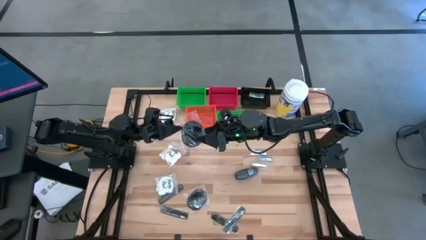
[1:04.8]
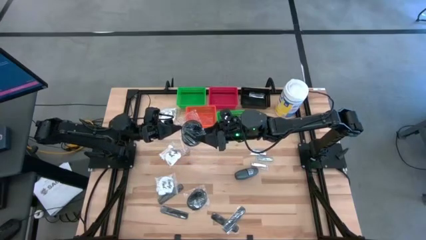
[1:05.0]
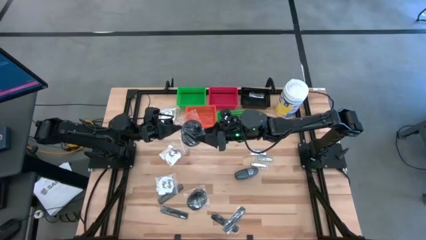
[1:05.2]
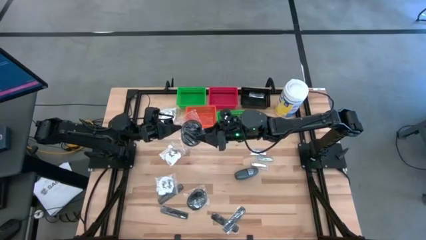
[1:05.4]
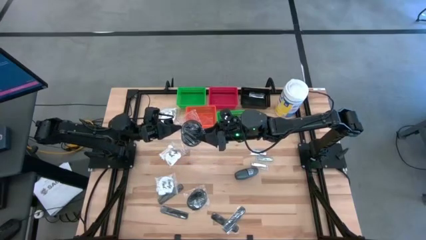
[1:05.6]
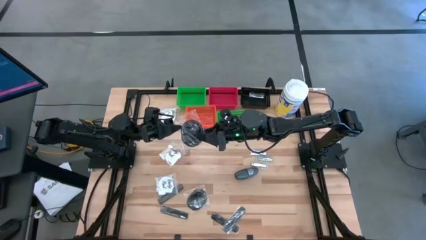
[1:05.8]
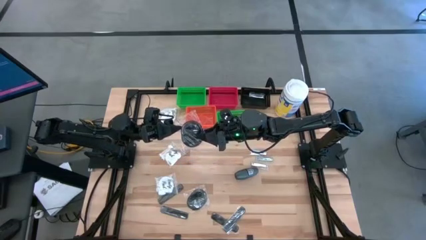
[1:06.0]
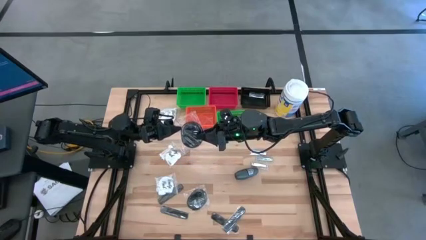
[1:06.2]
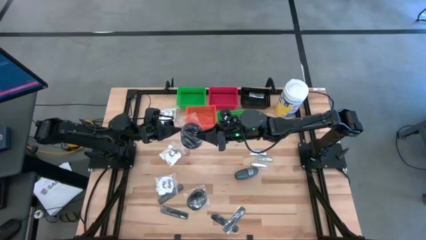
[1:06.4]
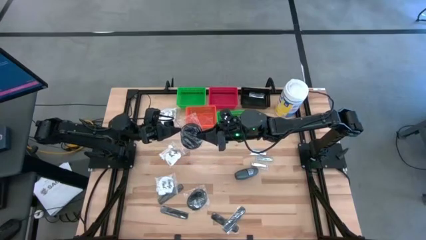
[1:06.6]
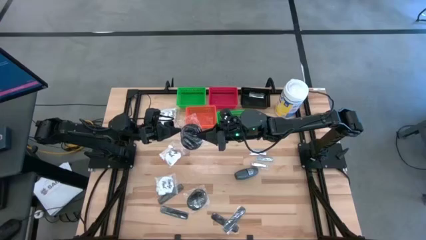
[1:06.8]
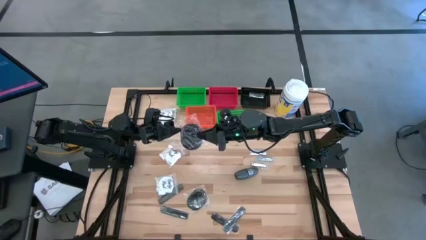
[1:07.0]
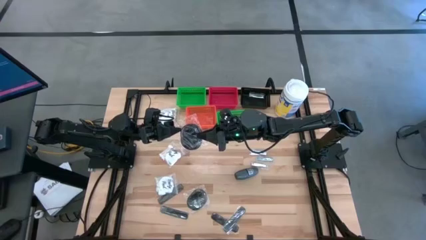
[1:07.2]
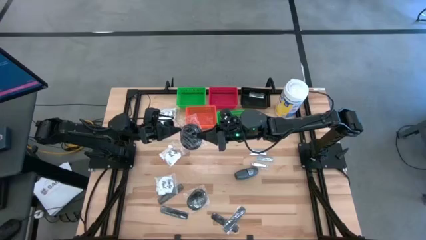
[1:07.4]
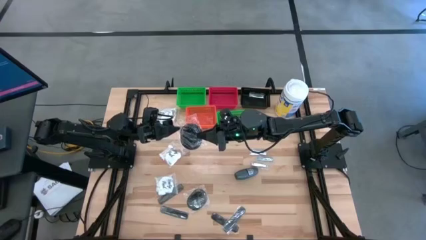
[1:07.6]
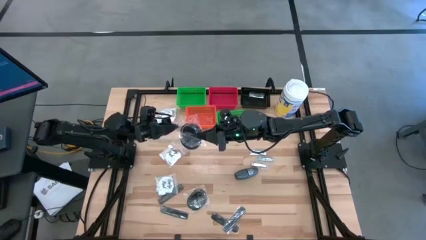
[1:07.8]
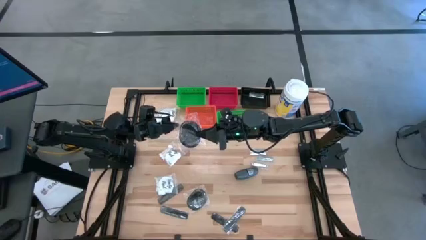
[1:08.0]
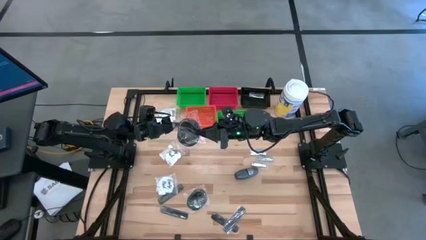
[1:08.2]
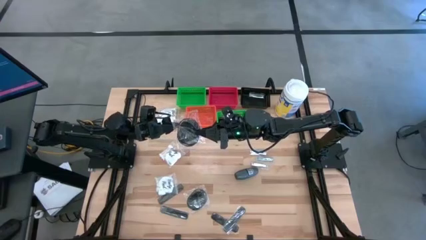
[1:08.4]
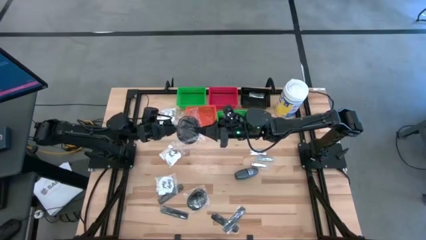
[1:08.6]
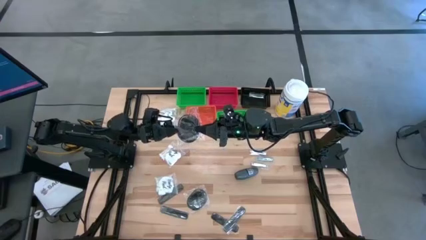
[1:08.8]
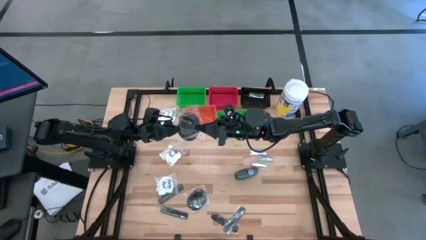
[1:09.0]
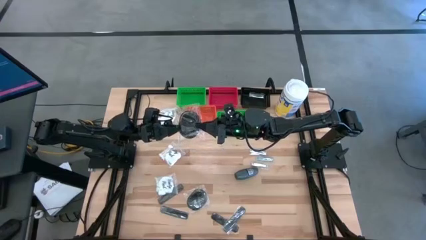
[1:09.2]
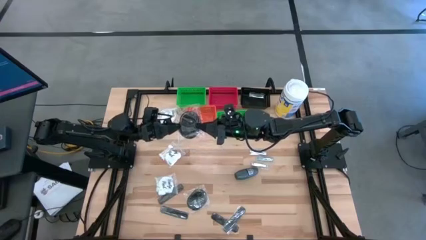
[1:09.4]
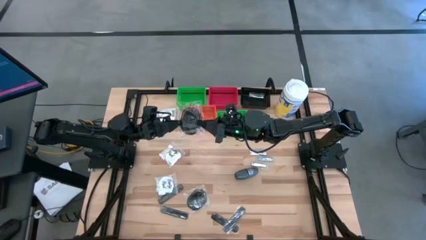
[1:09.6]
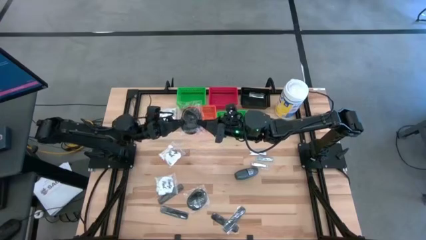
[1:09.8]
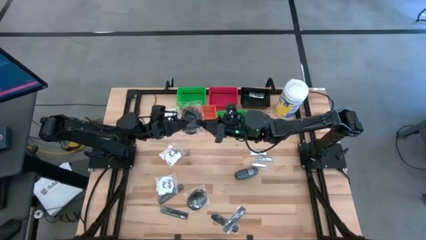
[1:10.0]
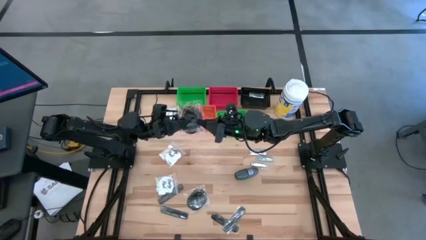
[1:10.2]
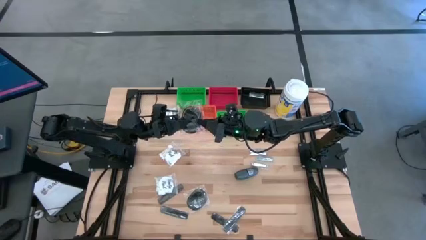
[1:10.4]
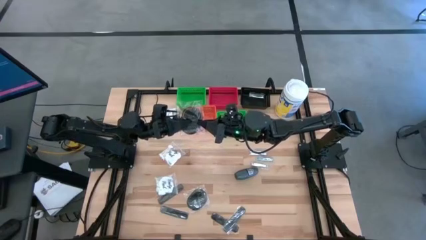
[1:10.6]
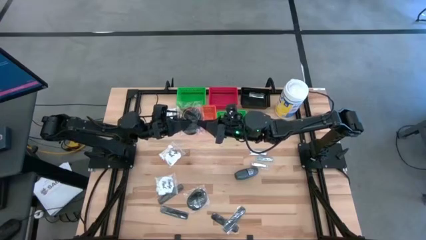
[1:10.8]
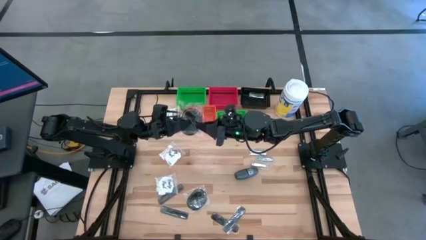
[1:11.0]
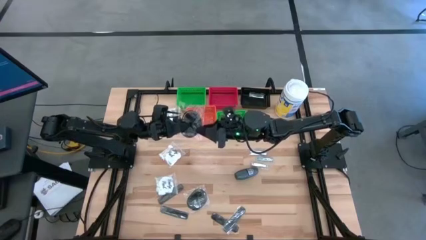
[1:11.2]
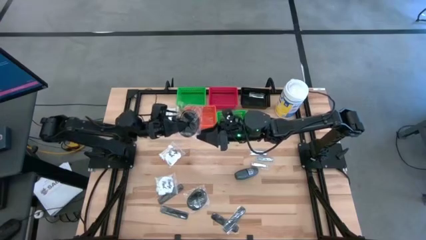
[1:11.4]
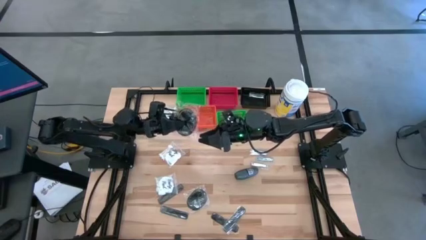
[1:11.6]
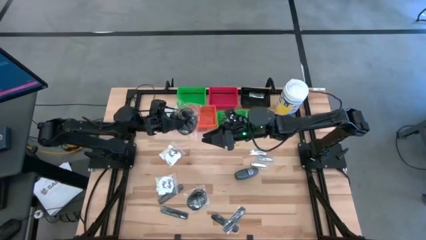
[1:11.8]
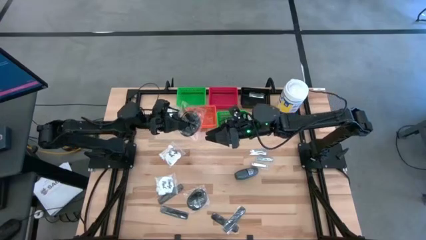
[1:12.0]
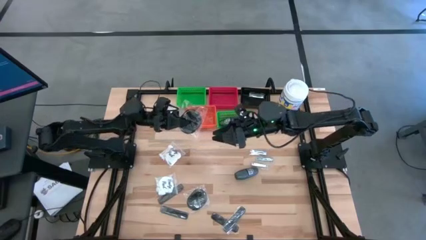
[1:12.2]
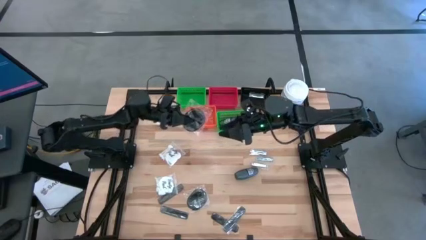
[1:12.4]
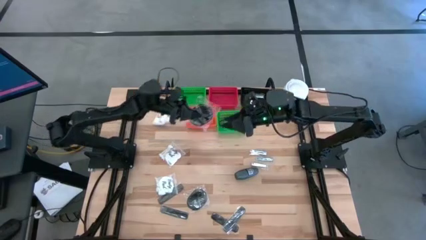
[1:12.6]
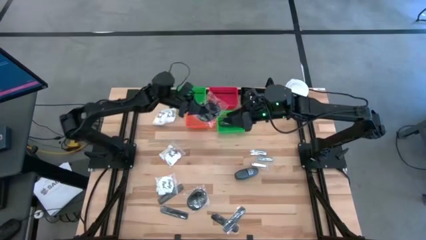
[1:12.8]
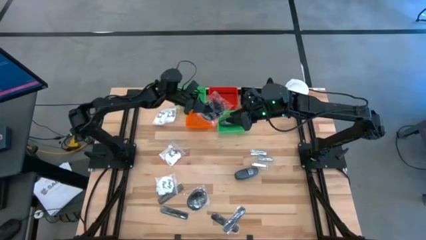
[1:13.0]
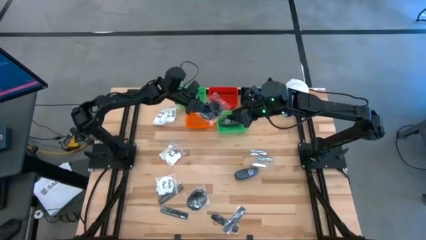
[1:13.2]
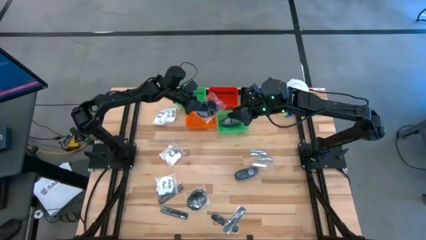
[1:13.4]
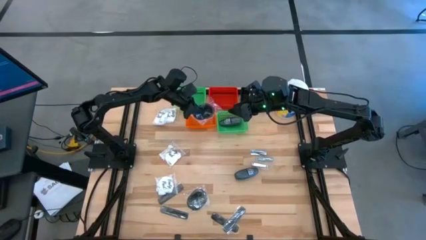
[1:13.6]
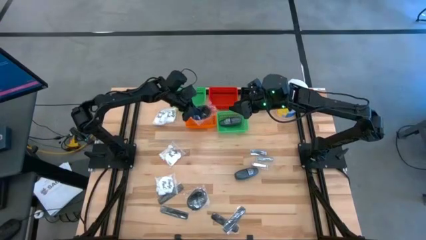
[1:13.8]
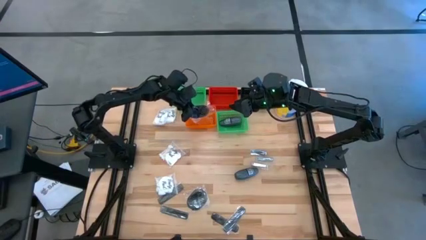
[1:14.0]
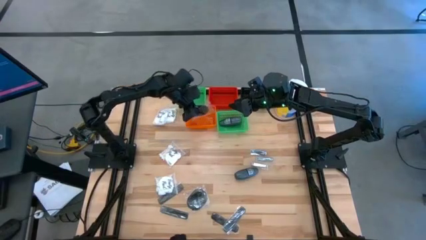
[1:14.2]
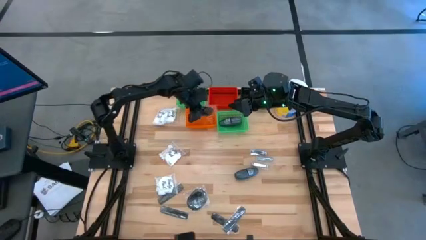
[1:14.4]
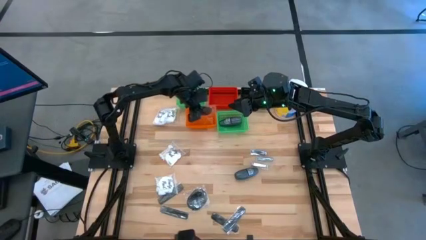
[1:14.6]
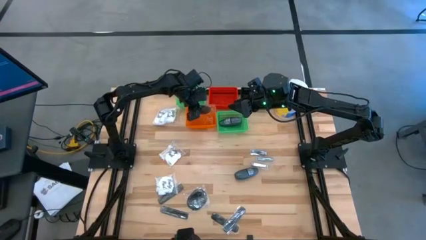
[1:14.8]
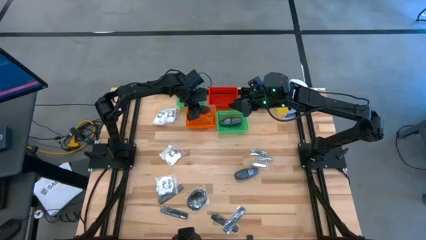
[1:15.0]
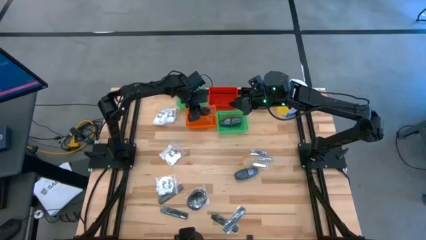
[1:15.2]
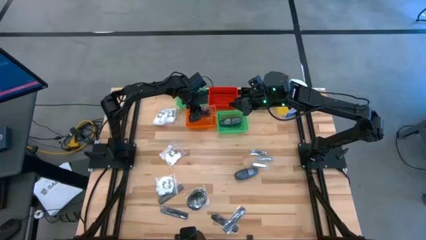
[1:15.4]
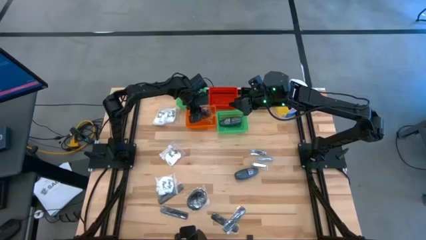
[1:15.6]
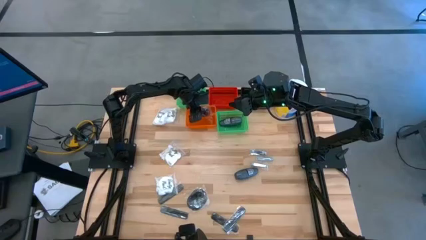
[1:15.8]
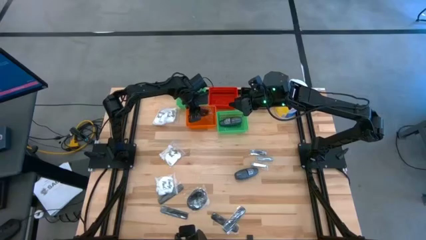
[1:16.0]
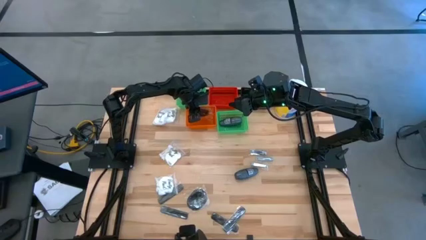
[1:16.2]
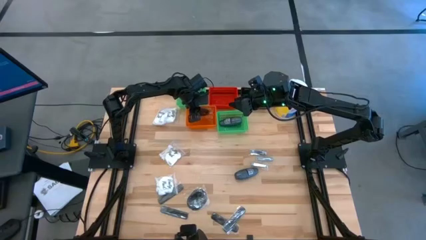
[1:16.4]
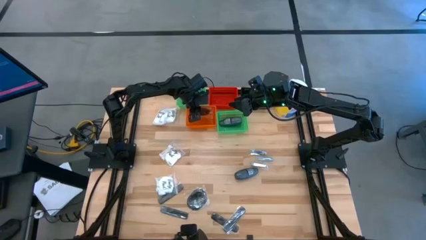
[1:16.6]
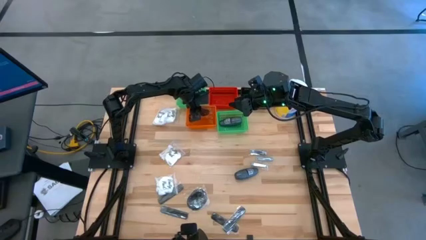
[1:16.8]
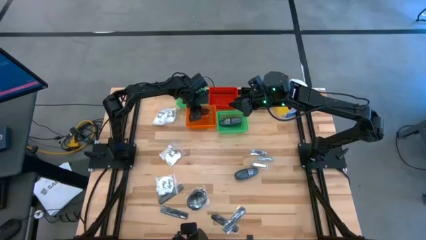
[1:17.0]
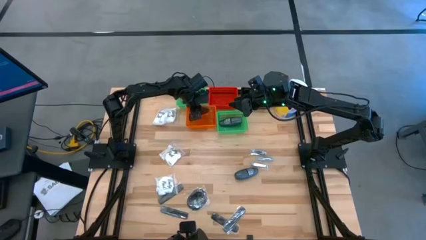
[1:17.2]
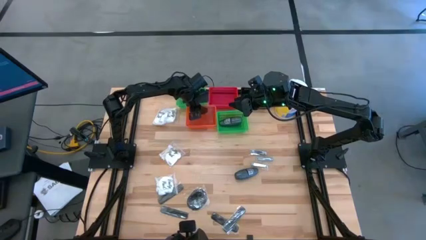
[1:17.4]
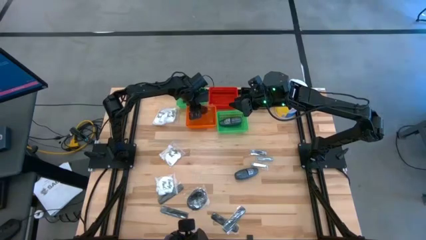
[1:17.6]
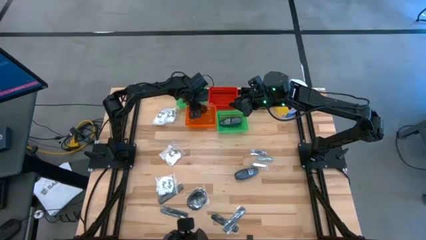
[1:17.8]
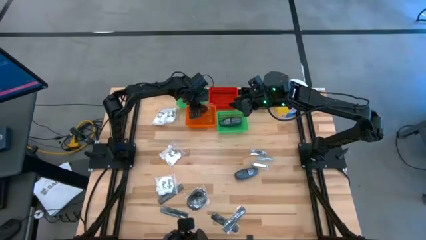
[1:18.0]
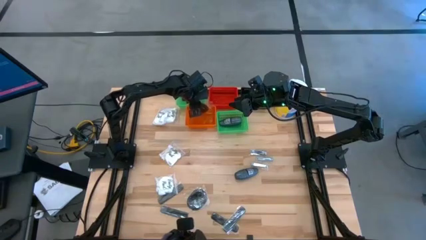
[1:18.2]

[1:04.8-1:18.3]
Task: Pick & Place Travel size toiletries
Put the black hair brush into the orange bin

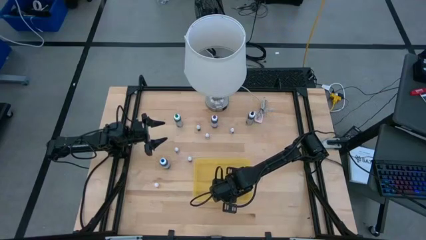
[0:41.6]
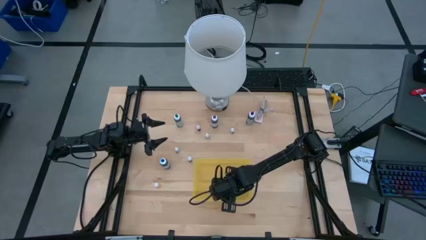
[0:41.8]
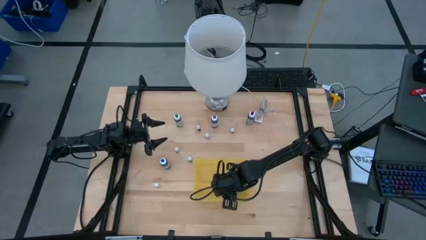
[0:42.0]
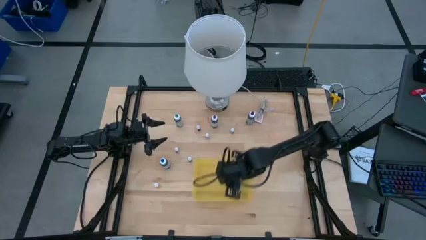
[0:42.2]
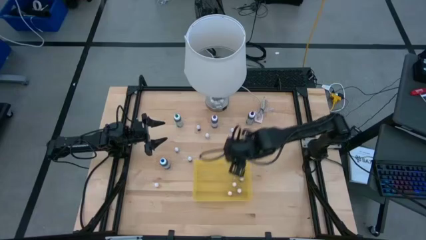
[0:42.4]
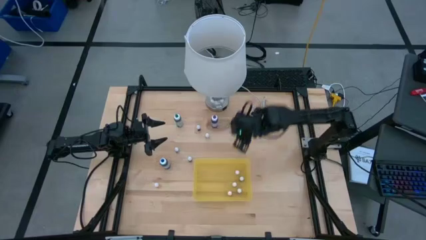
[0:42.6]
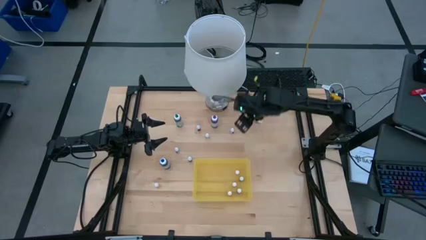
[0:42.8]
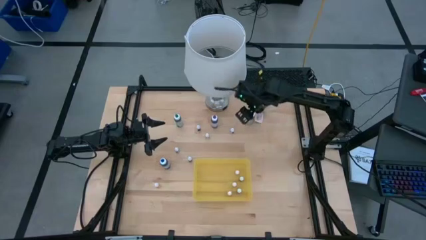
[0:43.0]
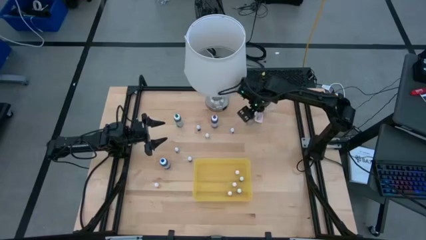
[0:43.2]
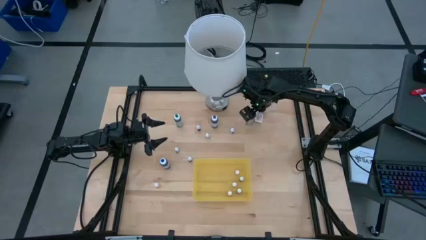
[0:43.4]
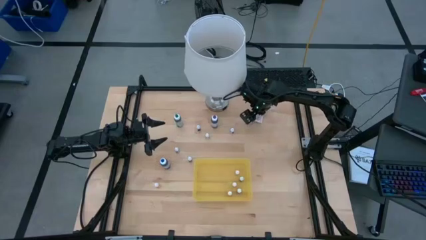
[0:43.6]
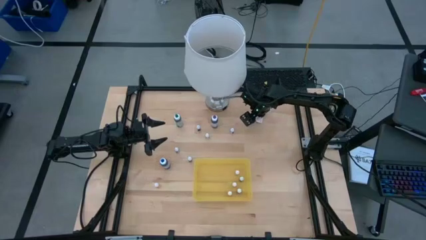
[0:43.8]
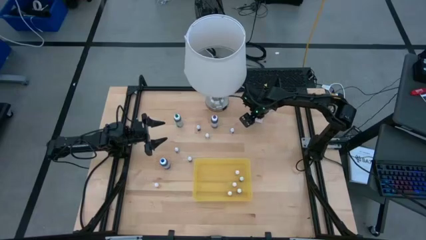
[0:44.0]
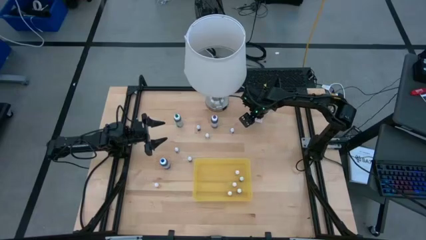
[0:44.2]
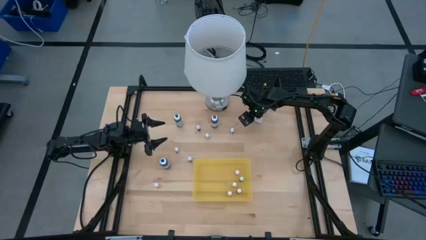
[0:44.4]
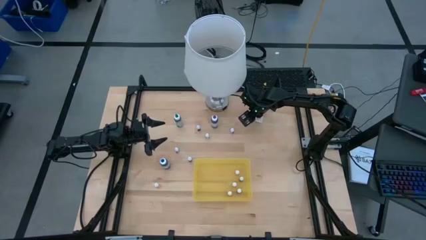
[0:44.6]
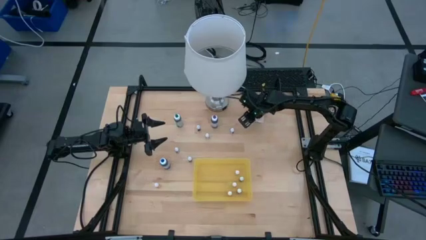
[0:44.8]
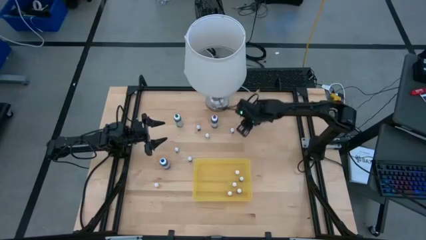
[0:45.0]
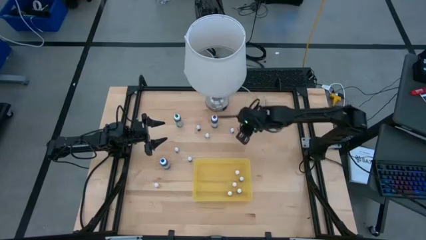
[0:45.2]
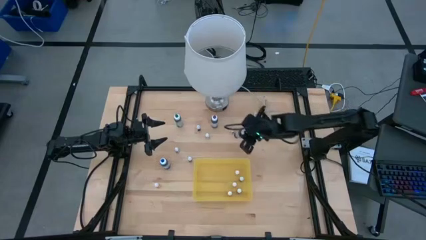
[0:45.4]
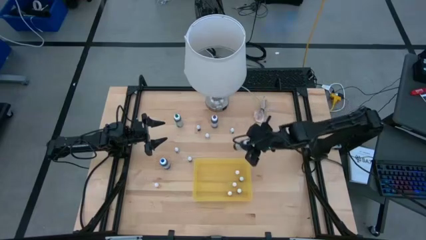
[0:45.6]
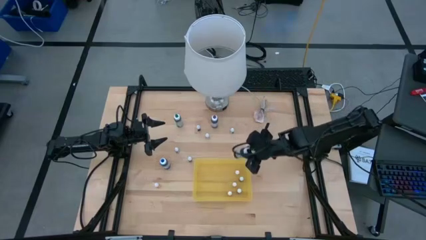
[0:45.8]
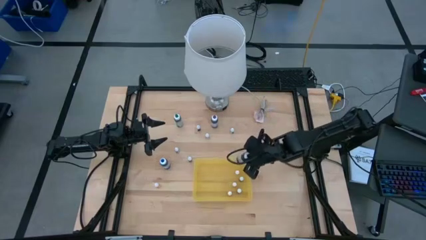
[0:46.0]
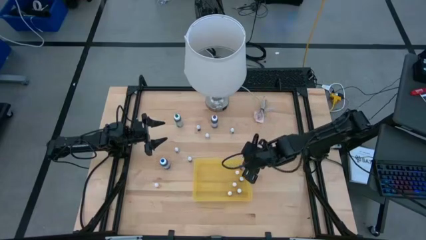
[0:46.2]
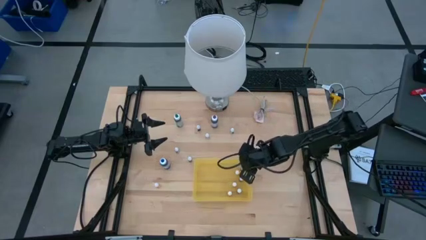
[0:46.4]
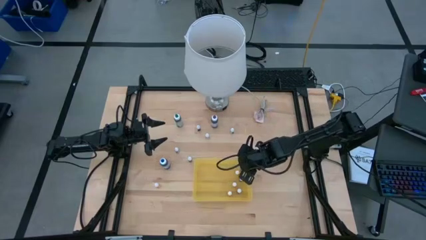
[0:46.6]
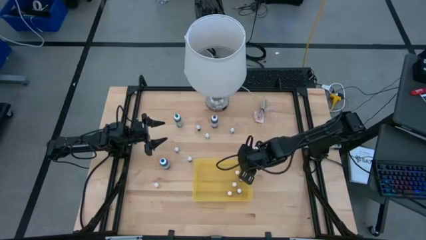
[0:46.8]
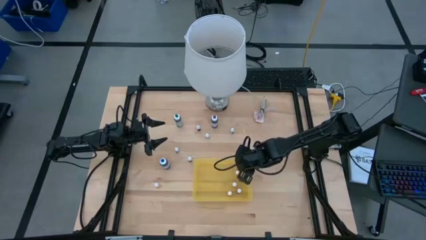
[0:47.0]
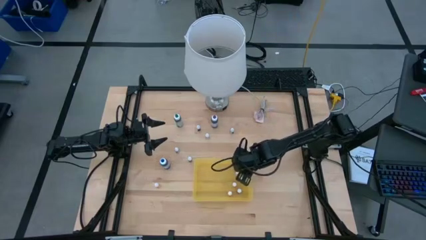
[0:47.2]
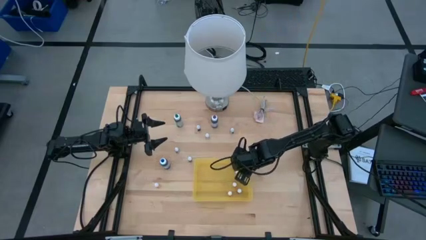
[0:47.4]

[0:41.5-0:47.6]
Task: Pick & Place food coloring
Put the large blue food coloring bottle into the transparent bin
